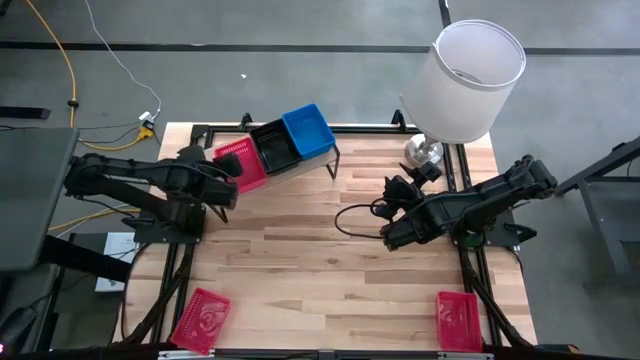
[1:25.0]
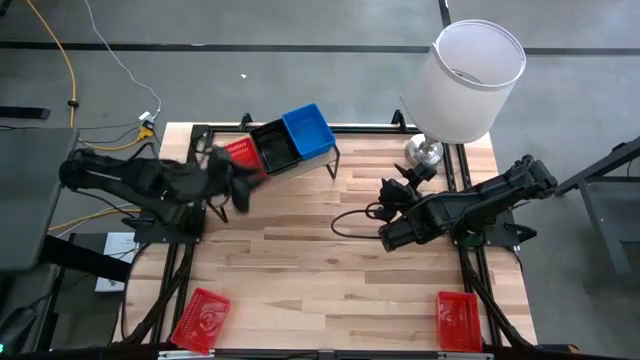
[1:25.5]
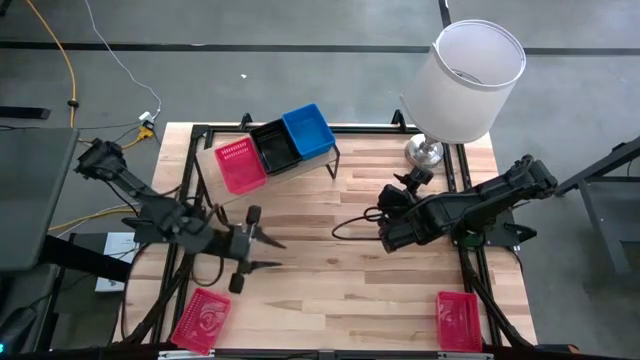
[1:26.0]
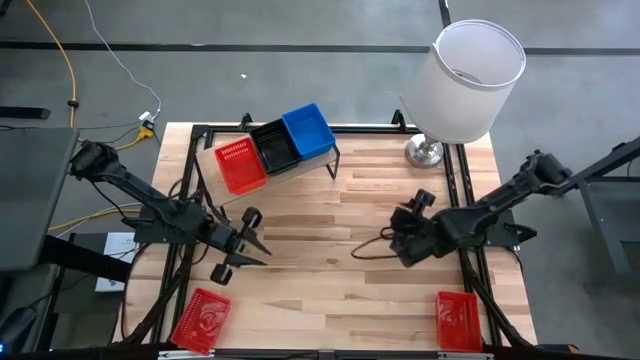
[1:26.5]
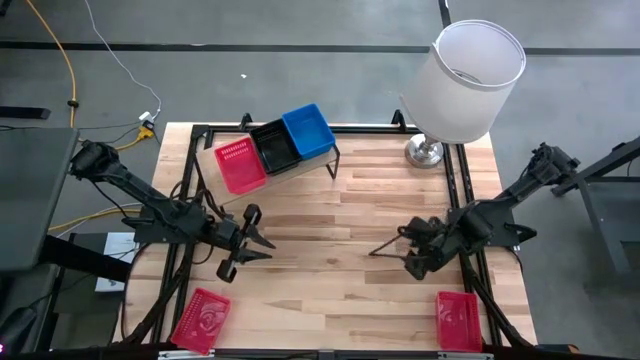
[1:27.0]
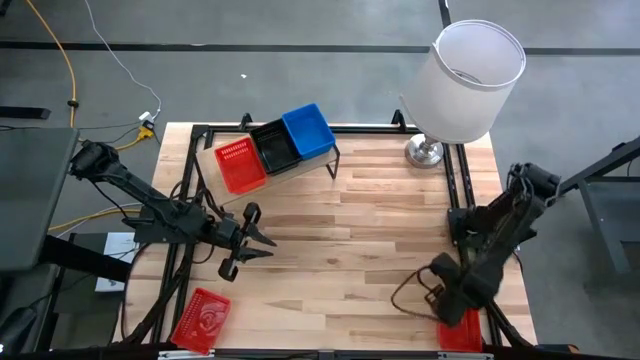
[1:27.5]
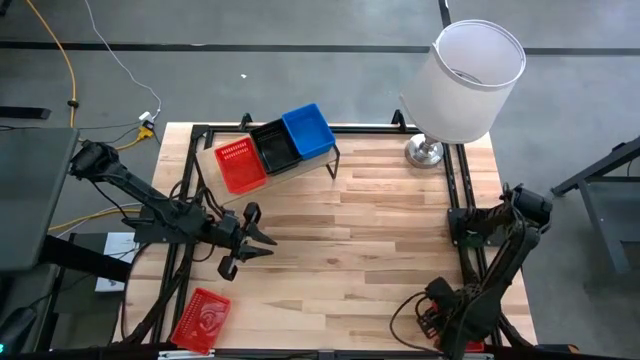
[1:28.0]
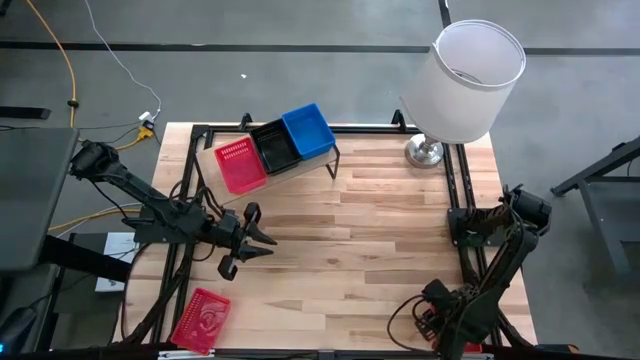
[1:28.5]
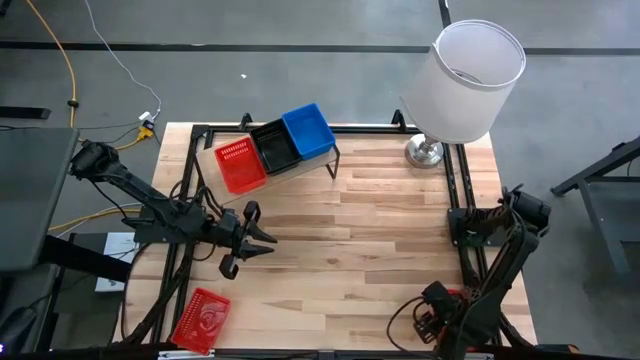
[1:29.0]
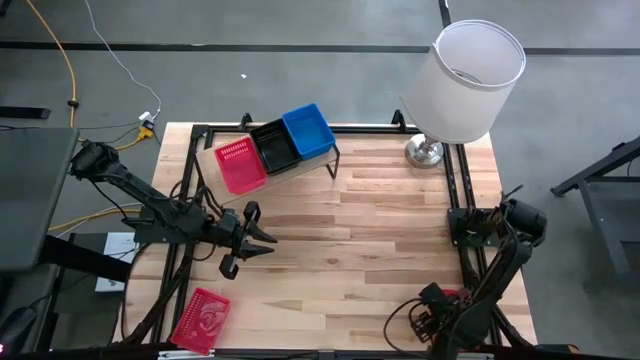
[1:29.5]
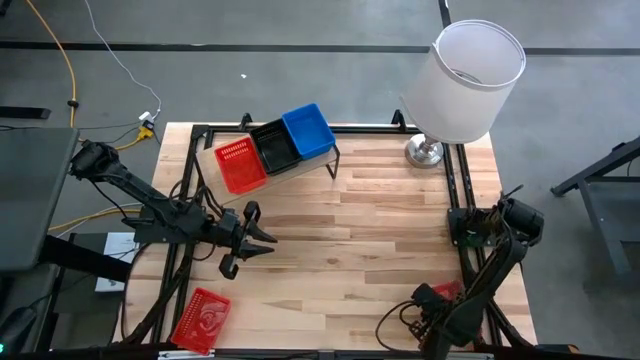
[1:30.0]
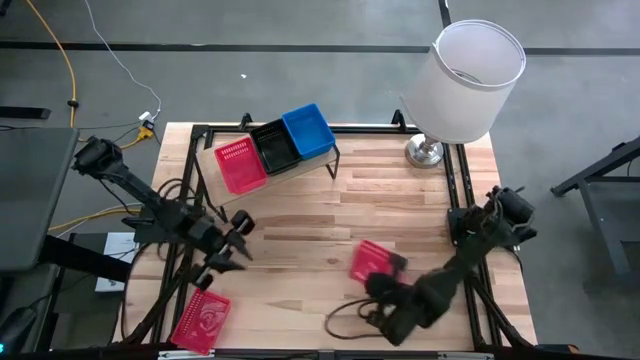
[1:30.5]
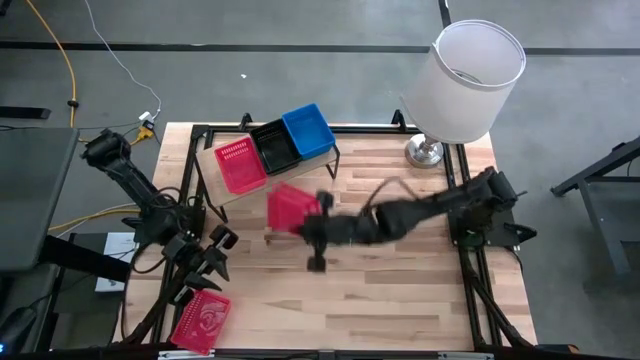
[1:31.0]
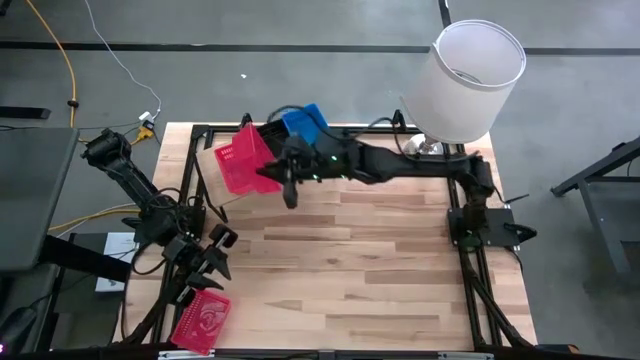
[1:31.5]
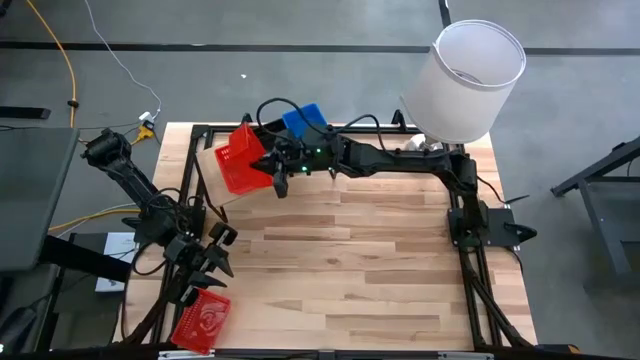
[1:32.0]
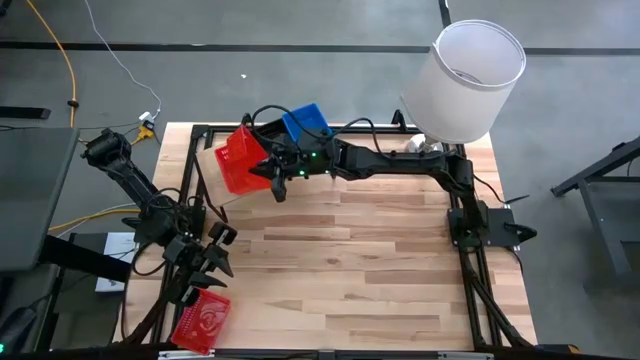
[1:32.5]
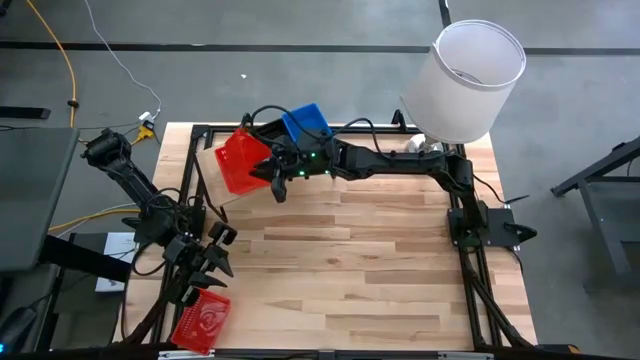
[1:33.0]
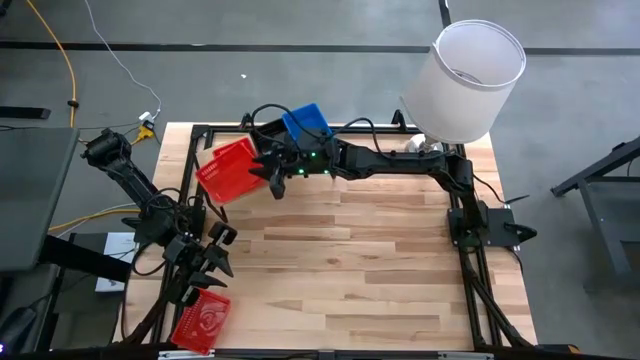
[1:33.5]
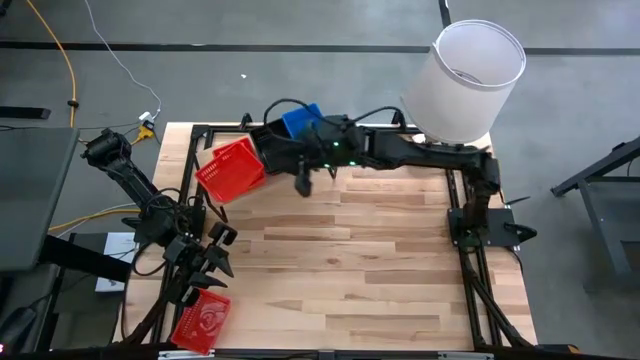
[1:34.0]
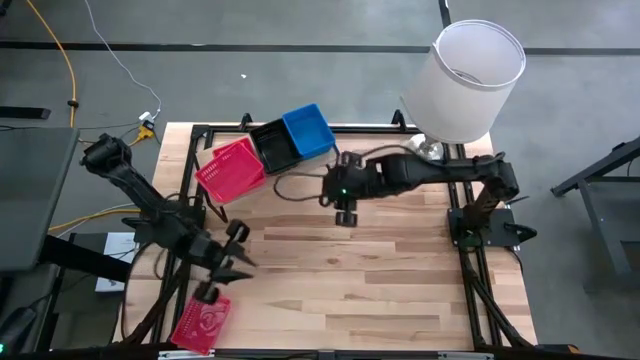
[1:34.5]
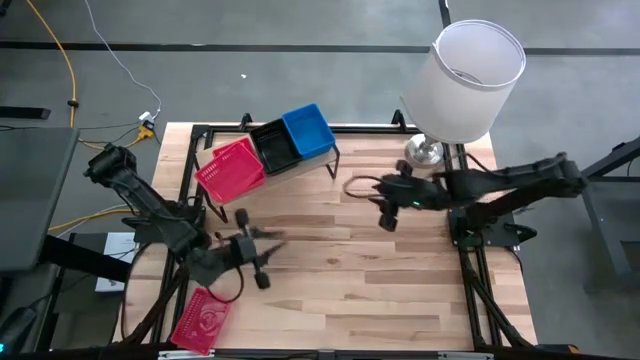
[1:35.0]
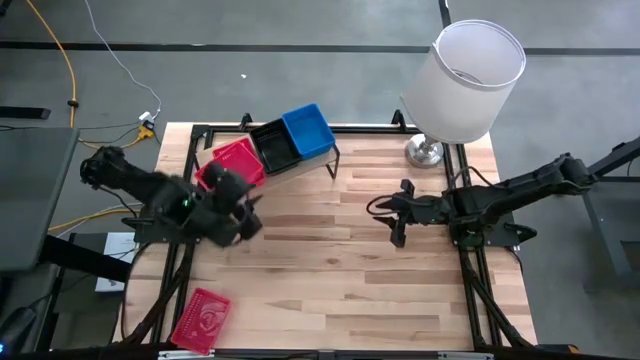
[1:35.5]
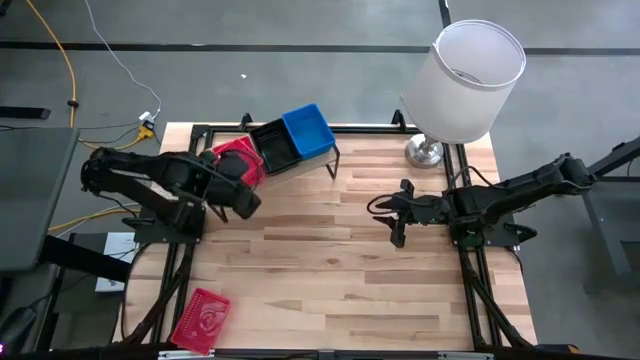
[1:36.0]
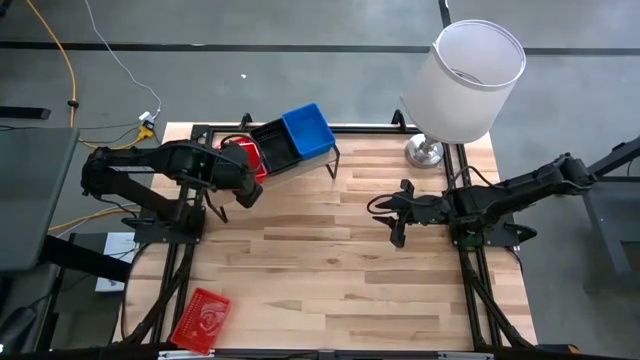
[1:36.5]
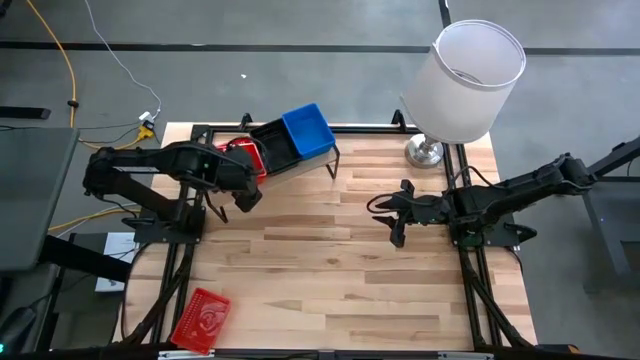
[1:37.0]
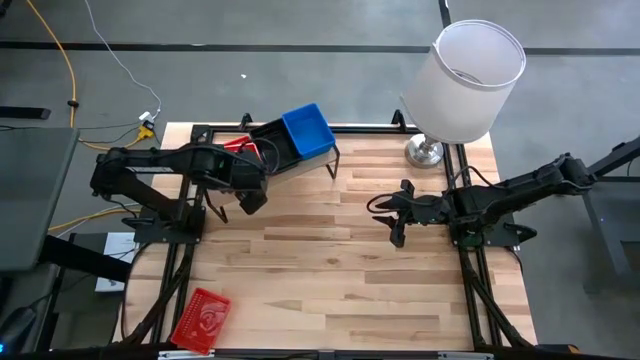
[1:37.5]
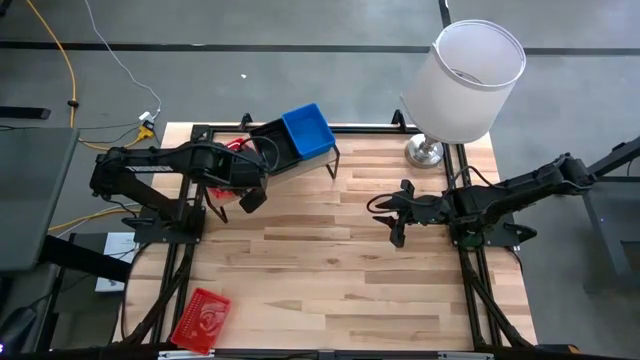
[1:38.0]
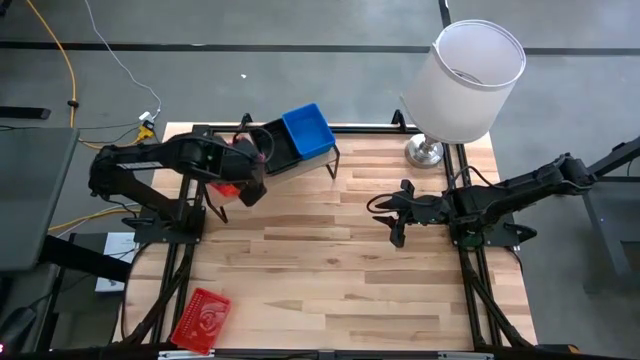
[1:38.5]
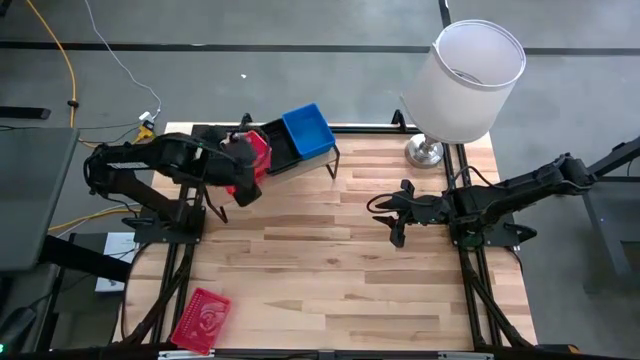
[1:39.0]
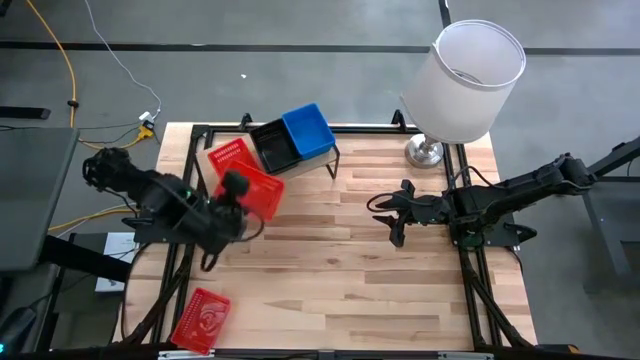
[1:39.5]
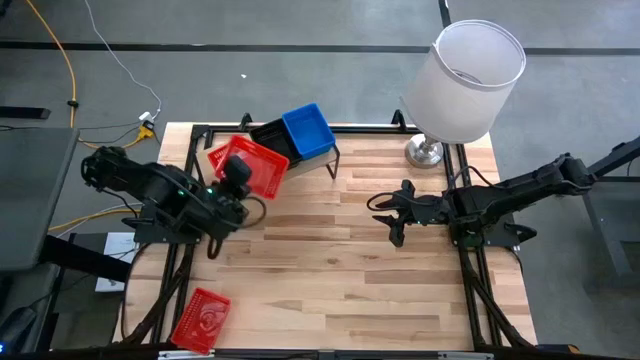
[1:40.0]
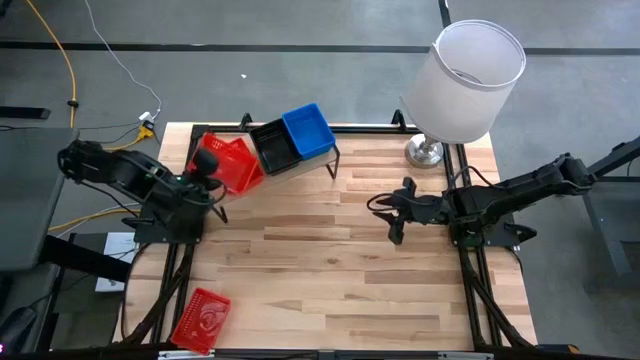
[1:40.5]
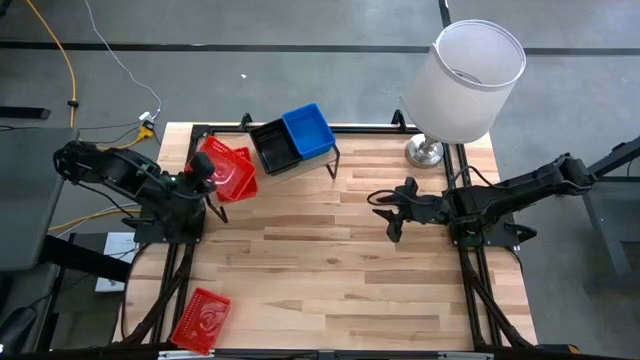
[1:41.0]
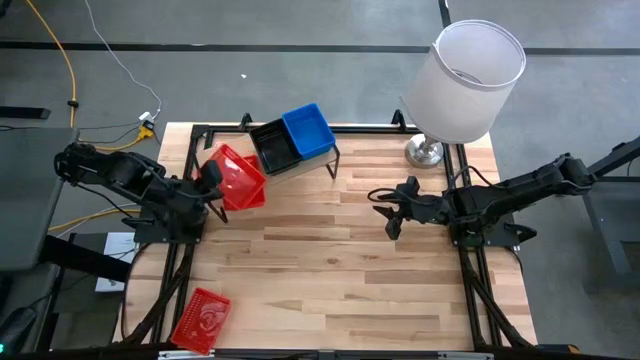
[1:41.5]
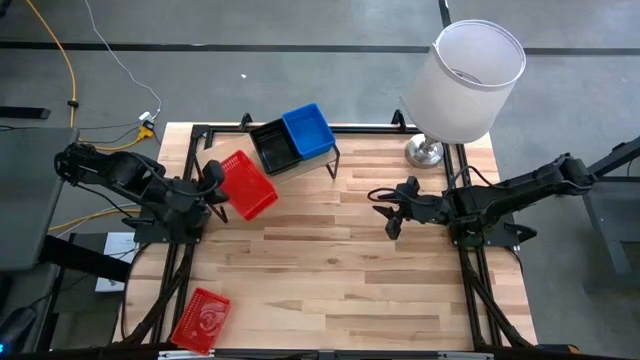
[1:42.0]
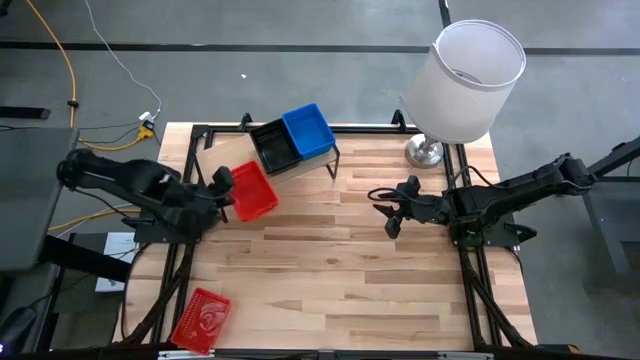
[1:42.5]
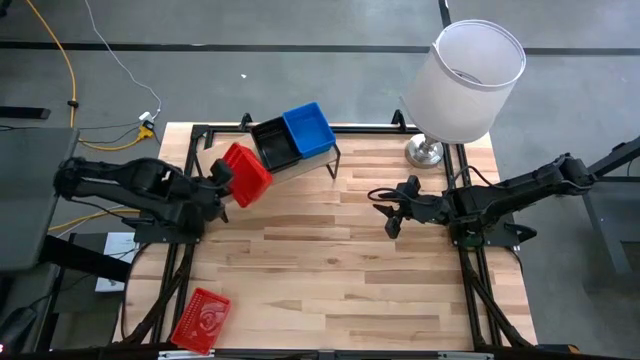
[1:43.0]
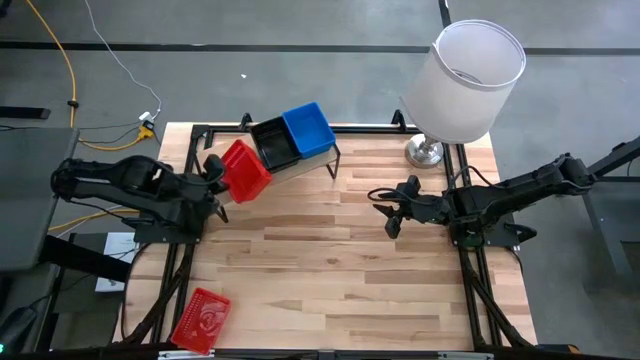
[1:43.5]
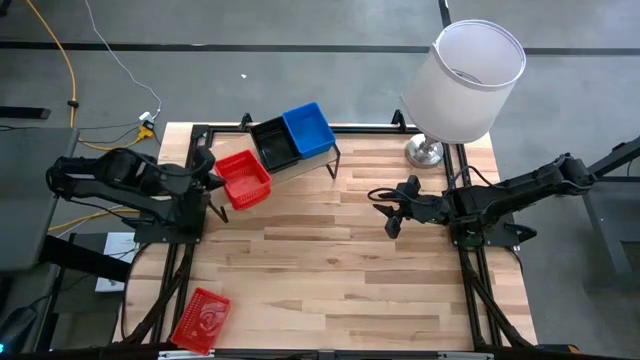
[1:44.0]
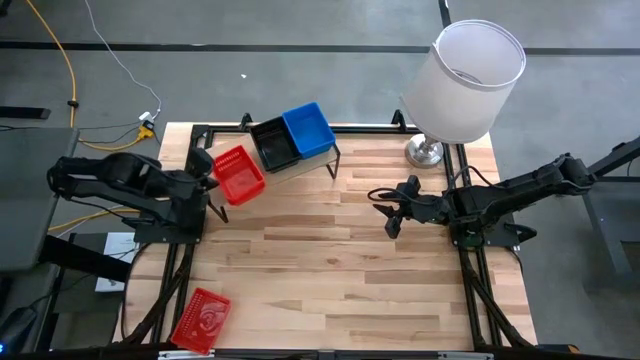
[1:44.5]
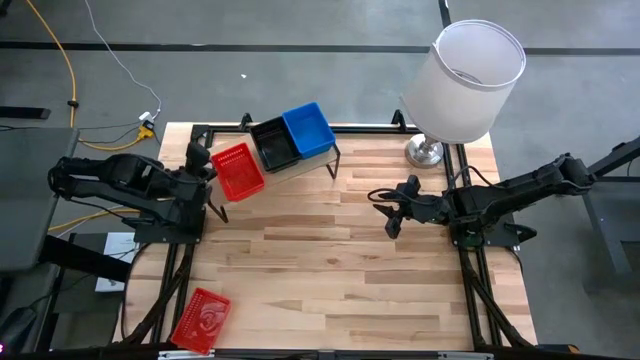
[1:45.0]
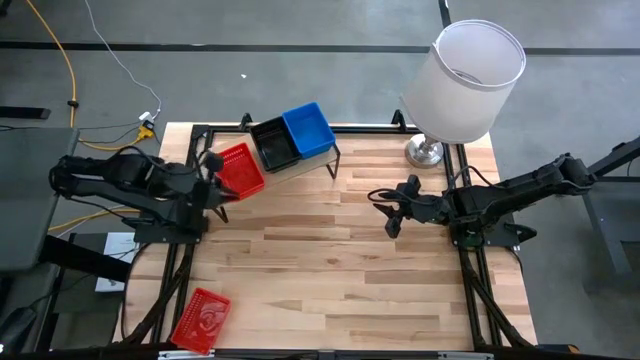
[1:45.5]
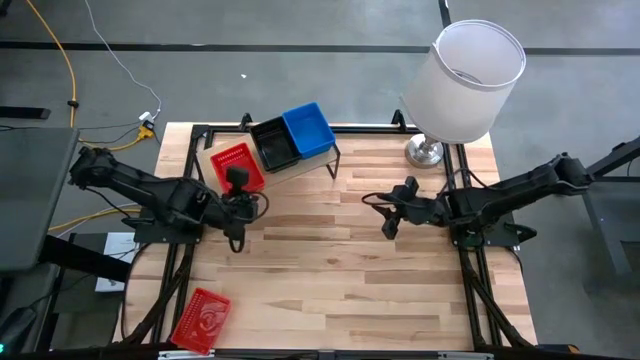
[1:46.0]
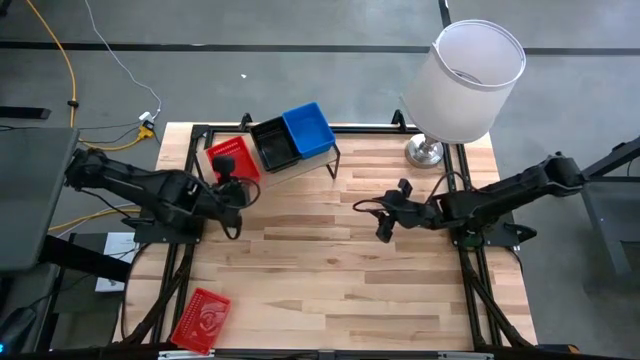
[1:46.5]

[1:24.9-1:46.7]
Task: Stack baskets on shelf by color
Stack the right red bin on top of the other red bin on the shelf
